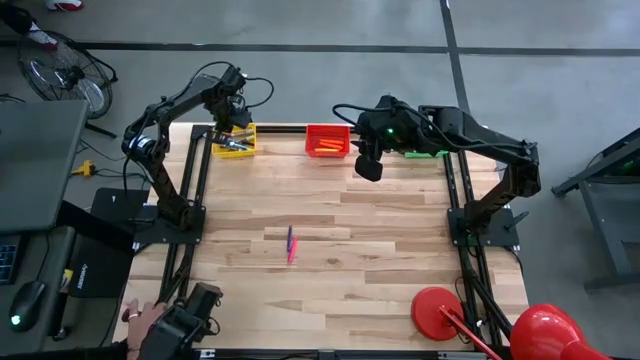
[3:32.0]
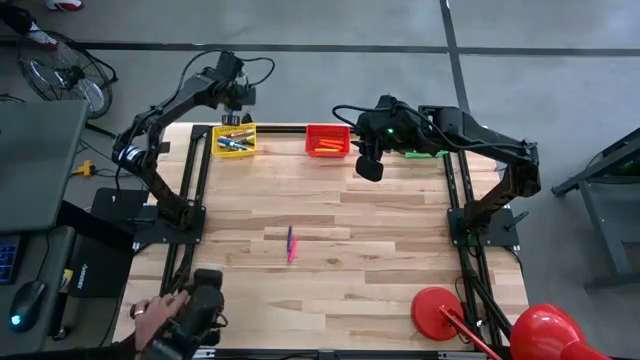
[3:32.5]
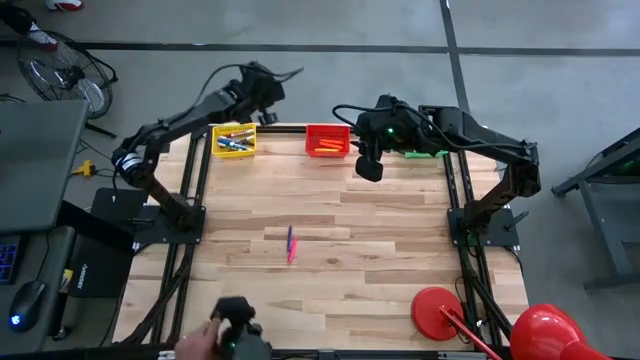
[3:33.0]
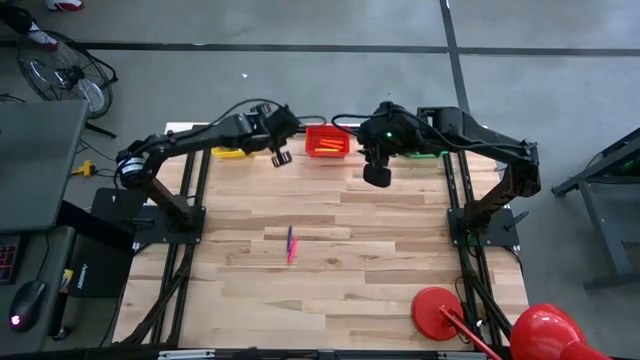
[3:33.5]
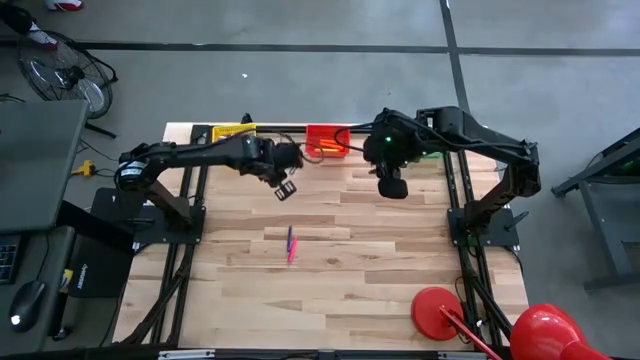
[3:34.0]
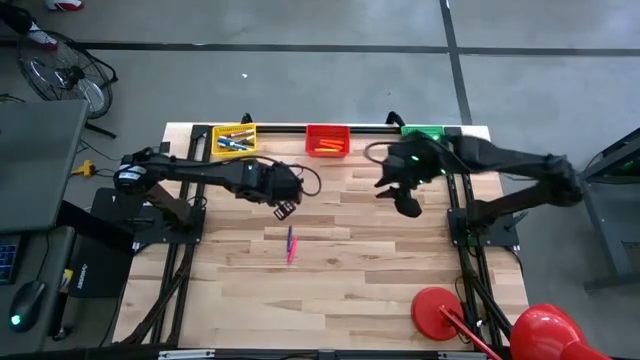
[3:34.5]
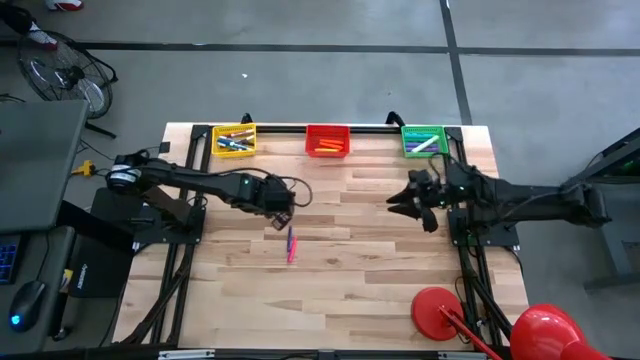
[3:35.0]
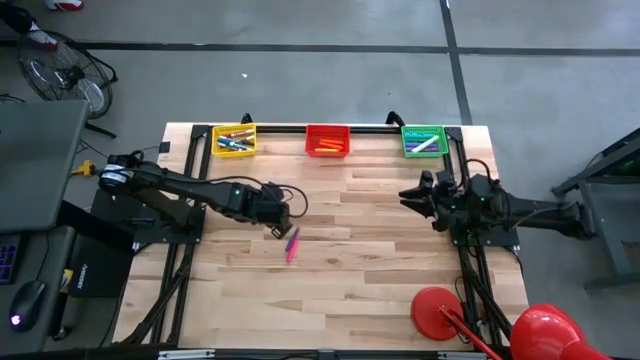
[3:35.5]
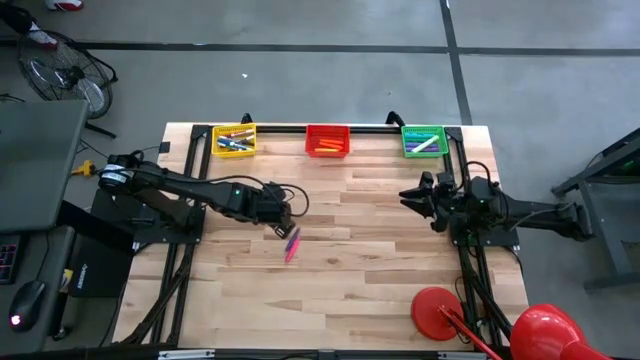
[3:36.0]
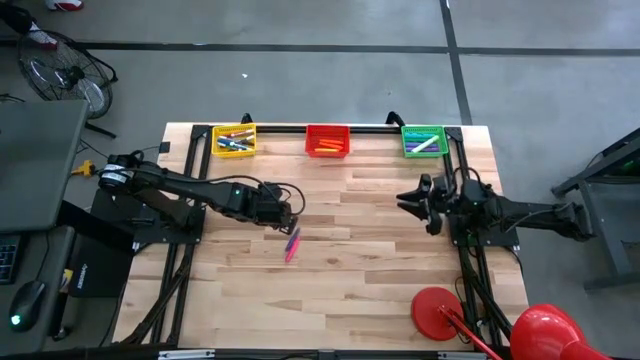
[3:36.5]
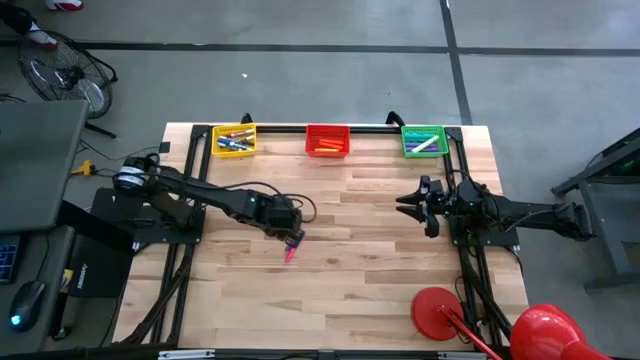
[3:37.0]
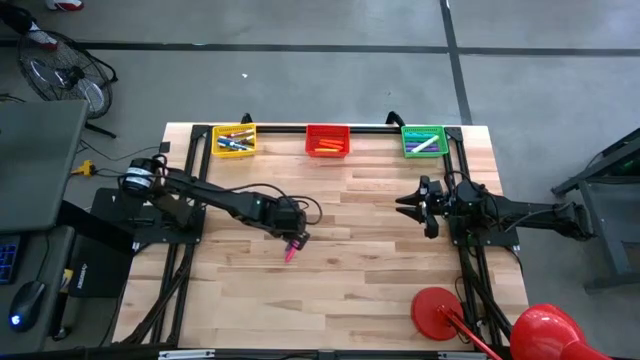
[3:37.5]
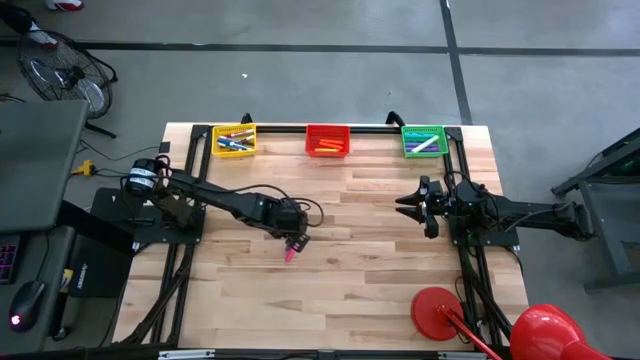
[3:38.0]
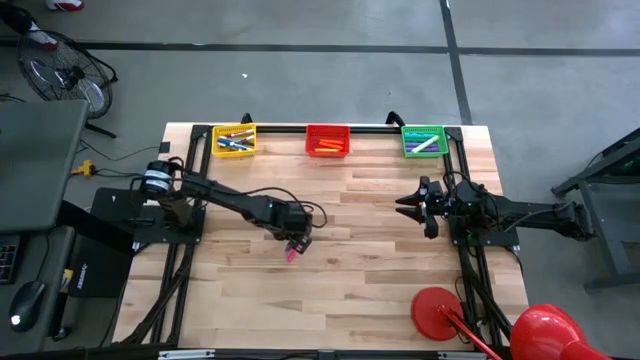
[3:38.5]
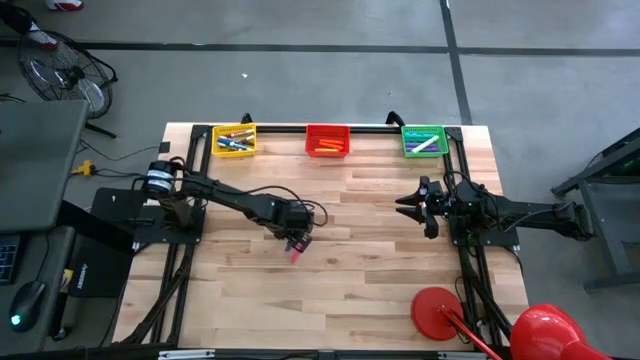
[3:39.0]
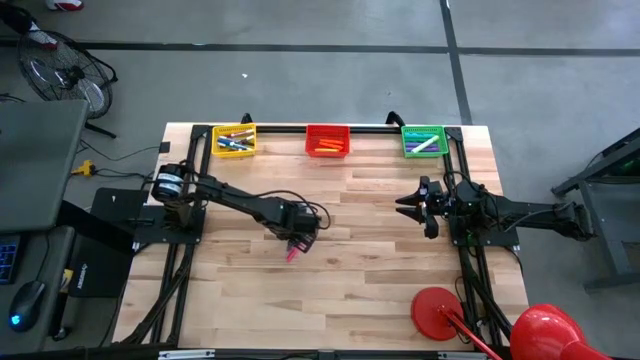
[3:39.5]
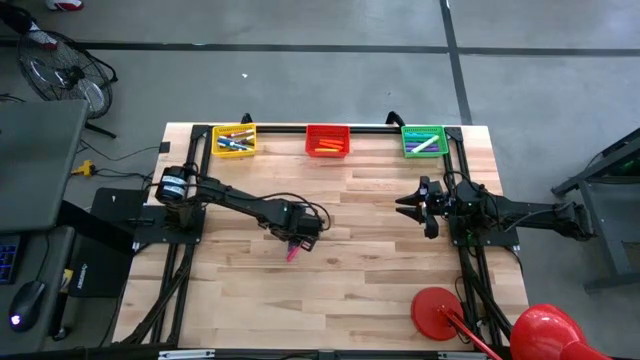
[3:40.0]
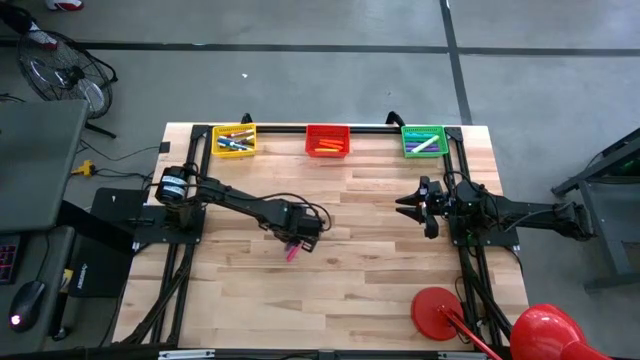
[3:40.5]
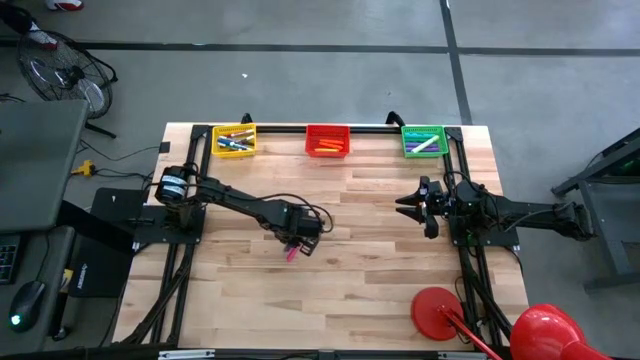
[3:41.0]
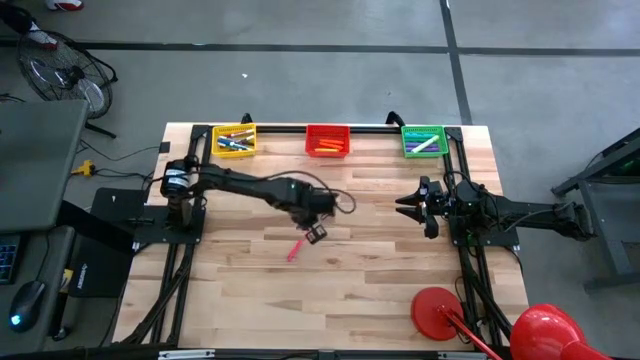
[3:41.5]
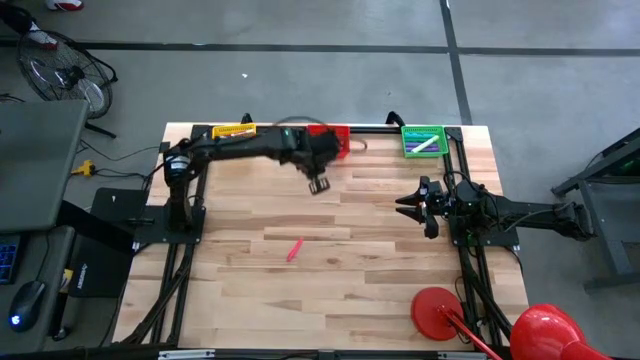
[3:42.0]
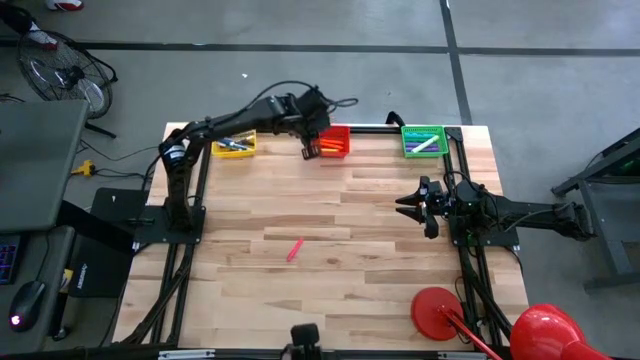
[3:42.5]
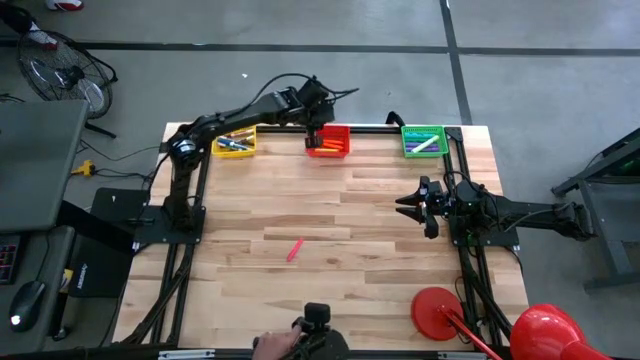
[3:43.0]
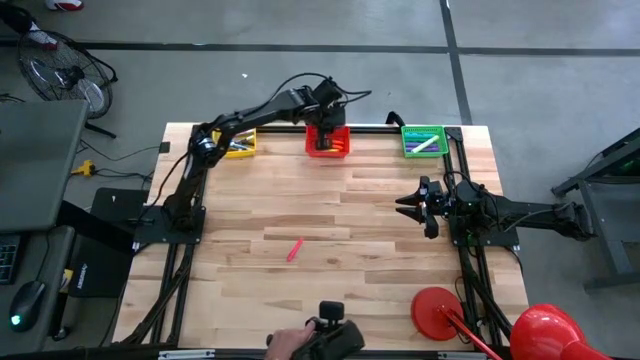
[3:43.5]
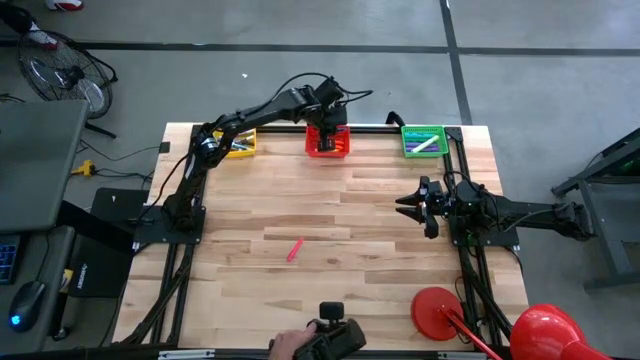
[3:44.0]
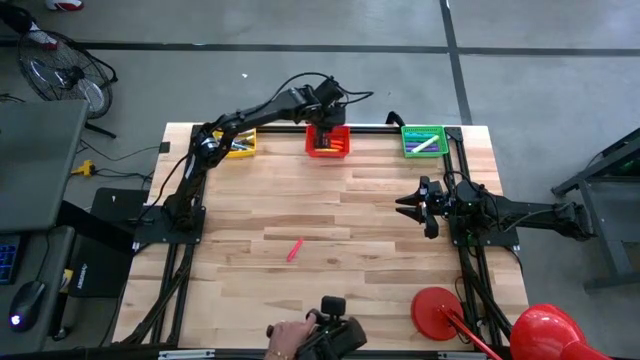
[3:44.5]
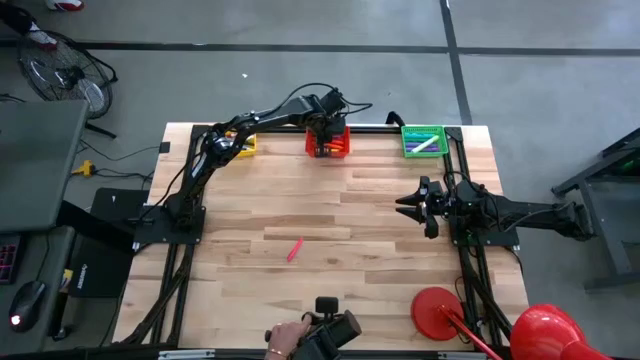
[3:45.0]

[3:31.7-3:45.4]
Task: Pick & Place Markers
Put the violet pen into the red bin

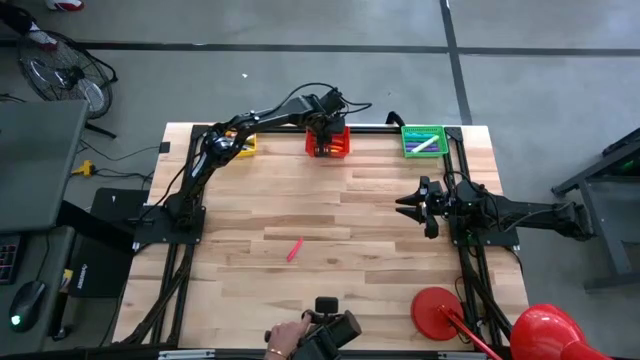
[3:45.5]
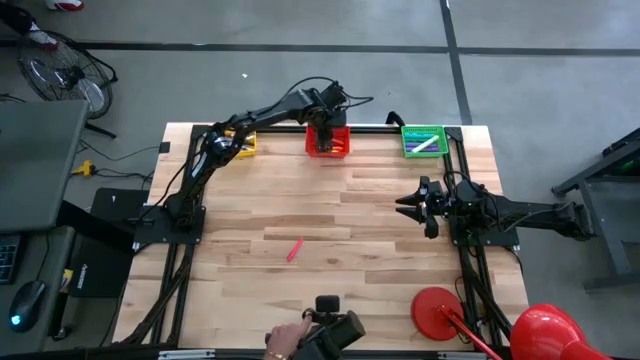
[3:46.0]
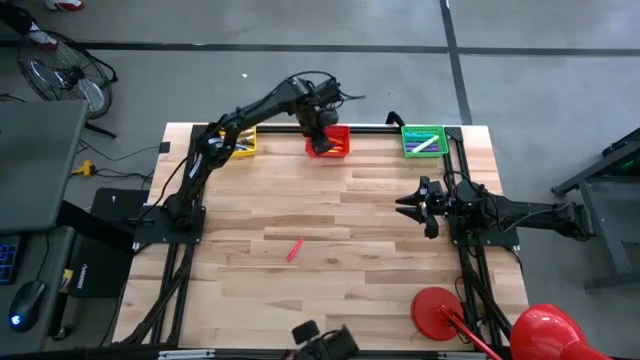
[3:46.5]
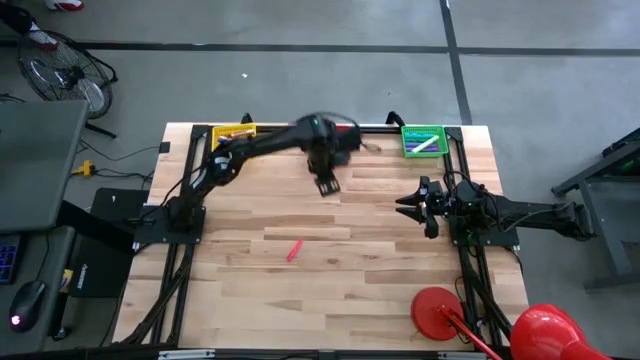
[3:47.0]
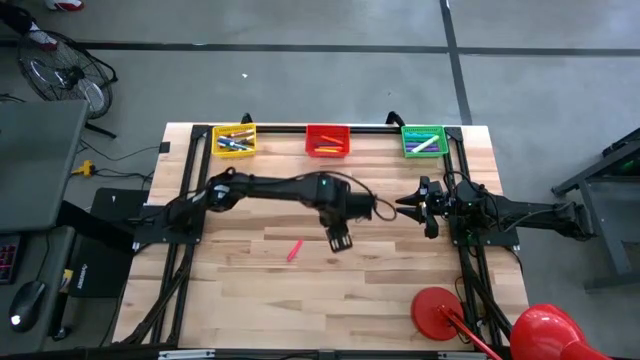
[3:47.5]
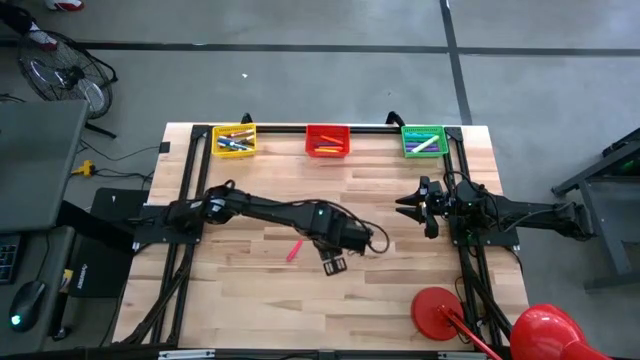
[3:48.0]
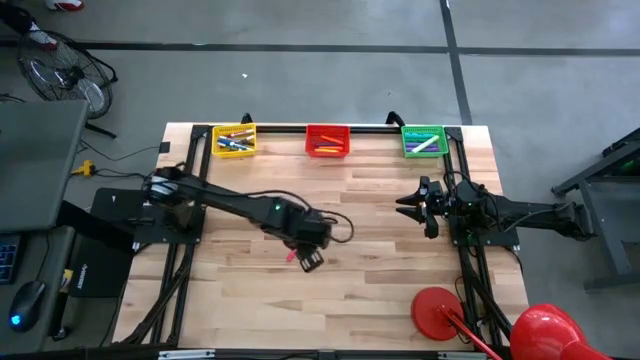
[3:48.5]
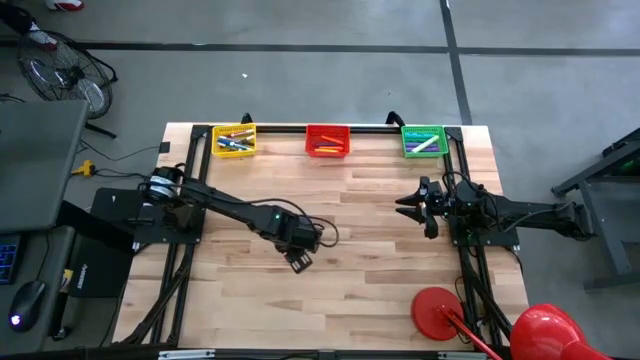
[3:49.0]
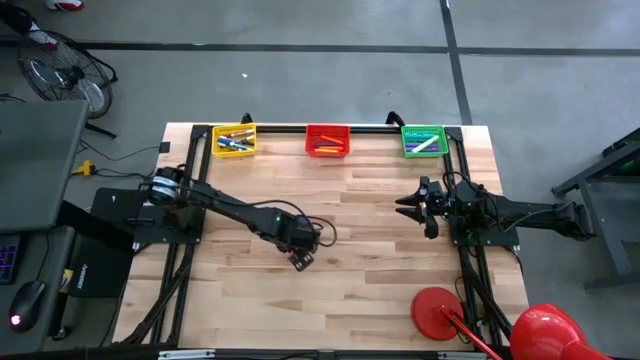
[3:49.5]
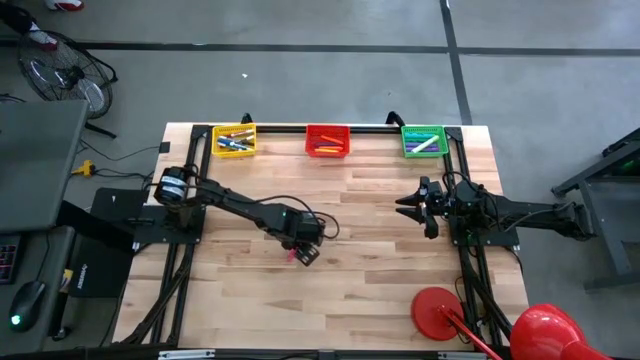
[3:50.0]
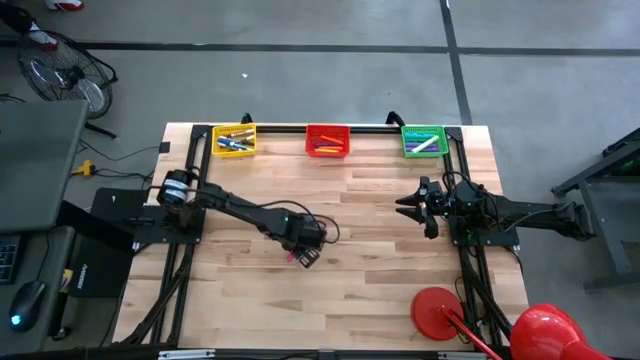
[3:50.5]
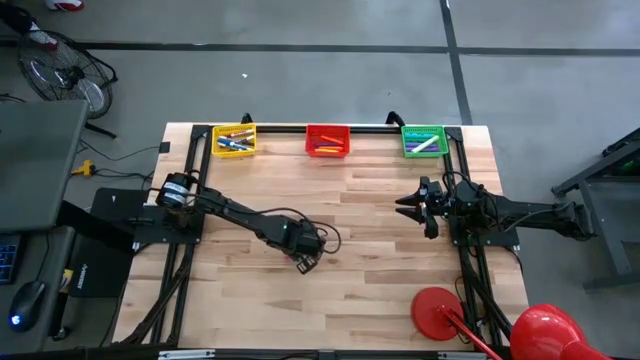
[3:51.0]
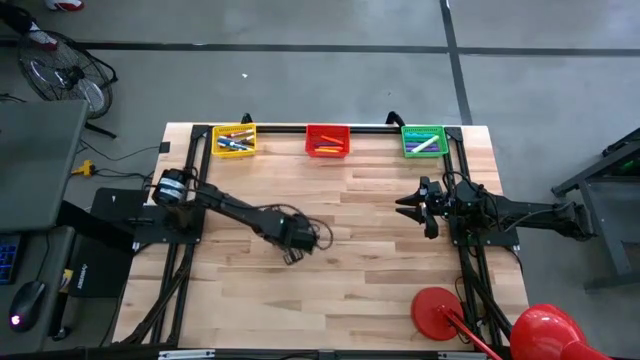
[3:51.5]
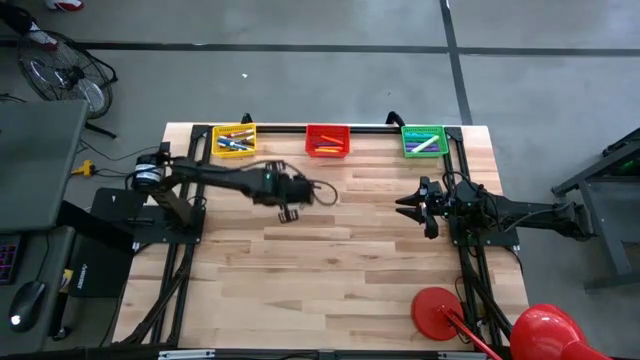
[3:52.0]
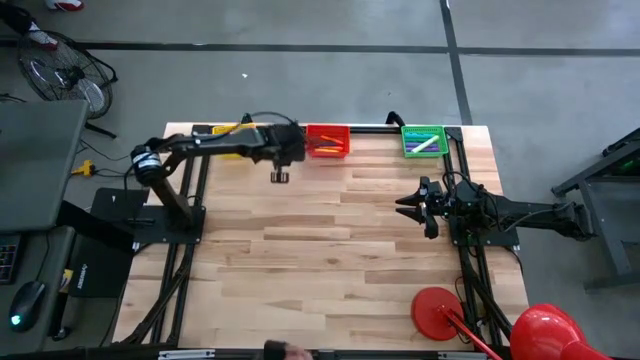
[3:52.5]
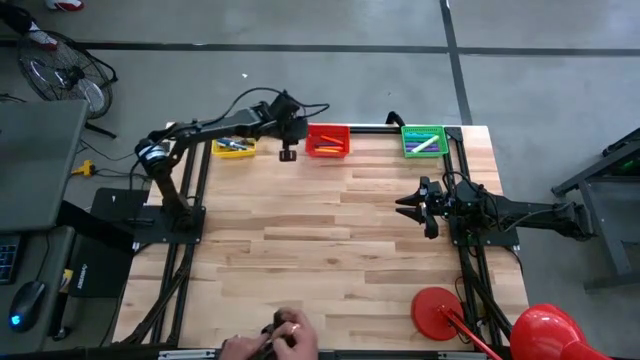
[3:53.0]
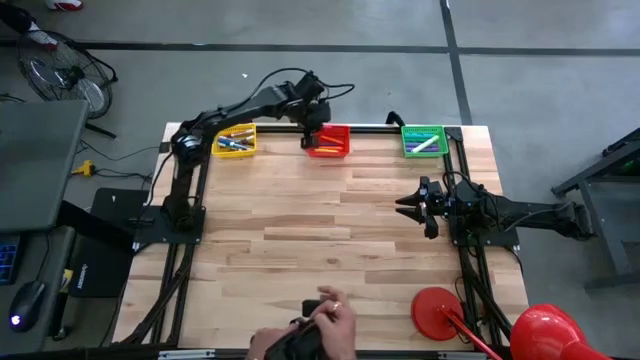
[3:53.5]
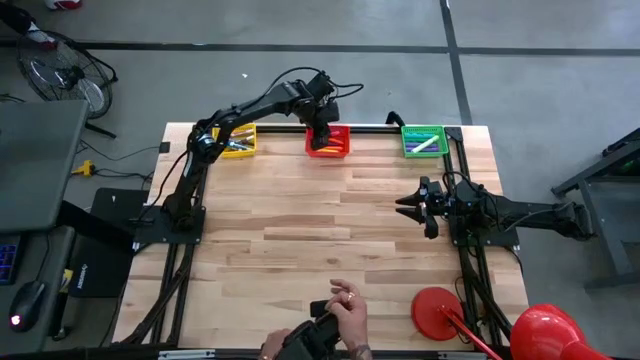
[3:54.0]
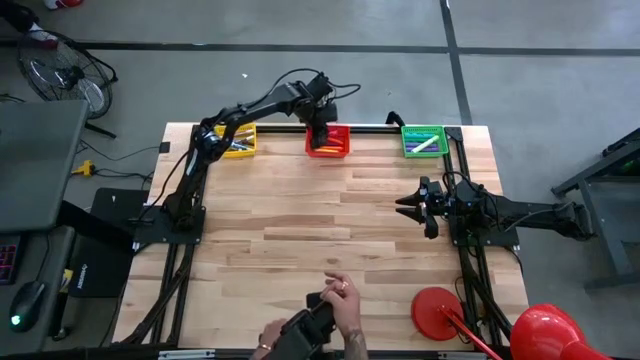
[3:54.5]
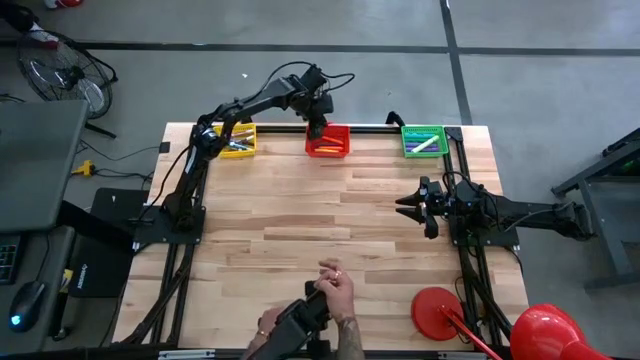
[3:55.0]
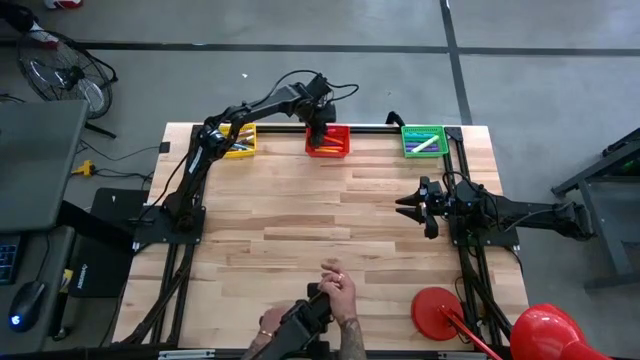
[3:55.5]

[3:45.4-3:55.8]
Put the pink pen into the red bin
